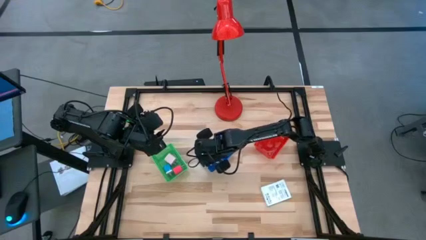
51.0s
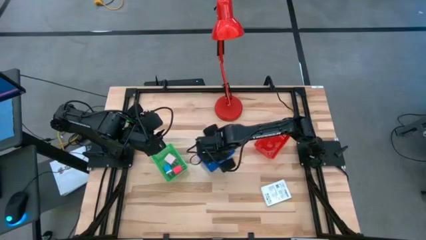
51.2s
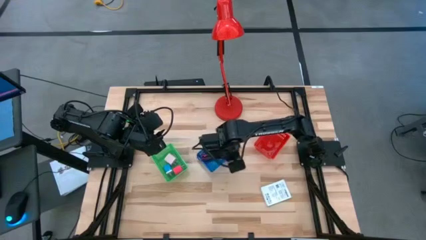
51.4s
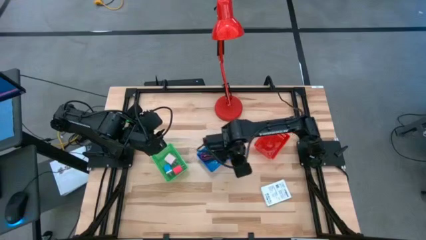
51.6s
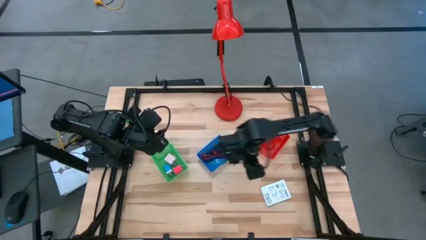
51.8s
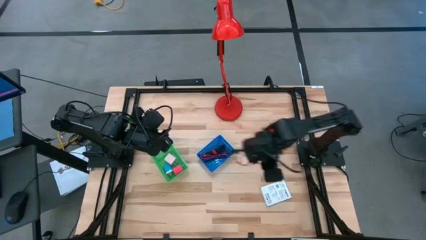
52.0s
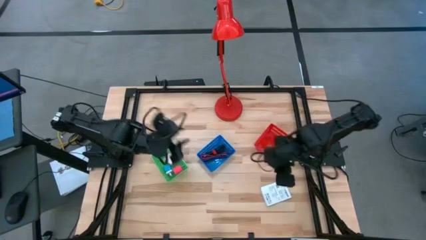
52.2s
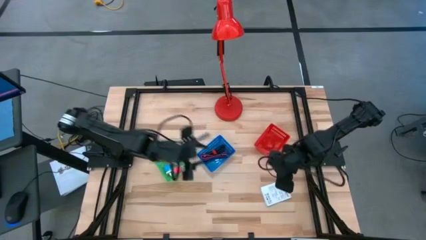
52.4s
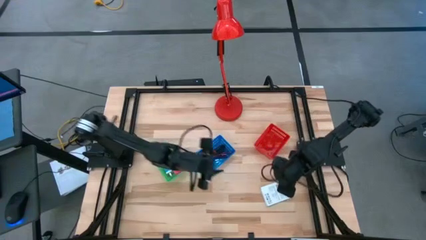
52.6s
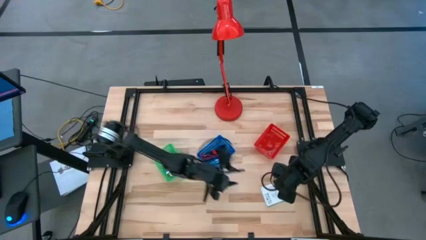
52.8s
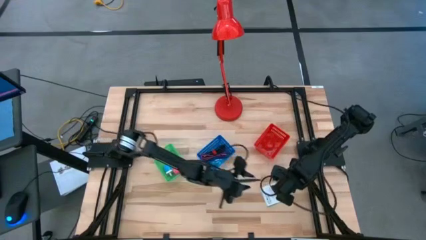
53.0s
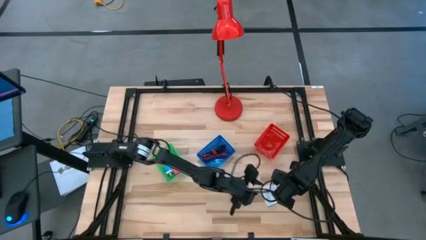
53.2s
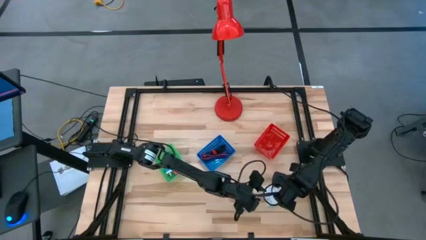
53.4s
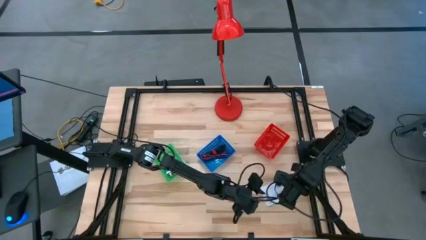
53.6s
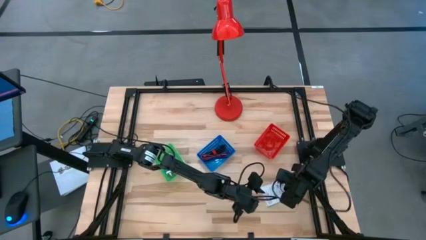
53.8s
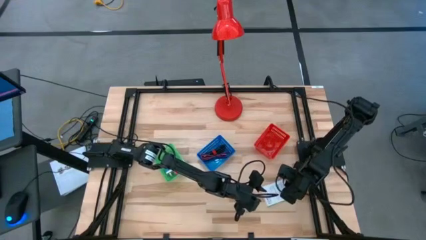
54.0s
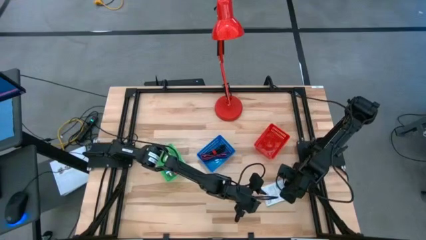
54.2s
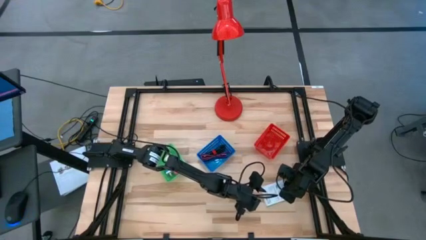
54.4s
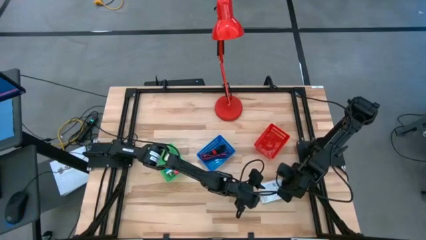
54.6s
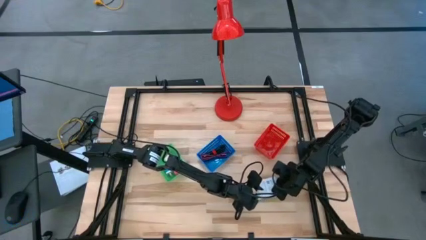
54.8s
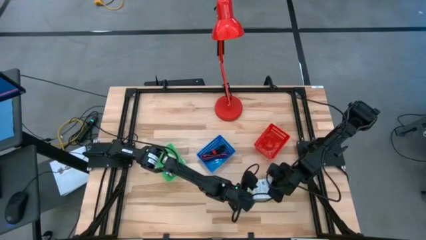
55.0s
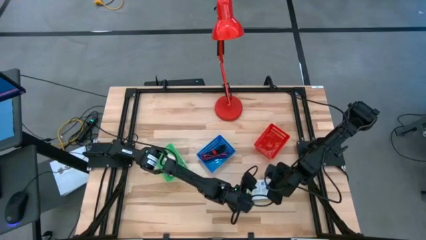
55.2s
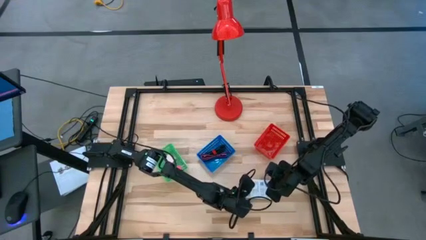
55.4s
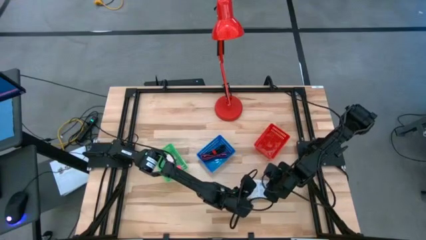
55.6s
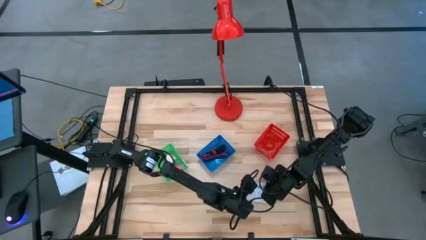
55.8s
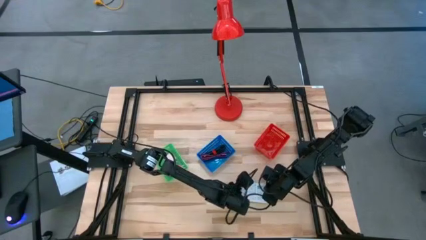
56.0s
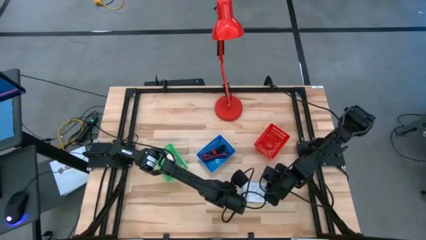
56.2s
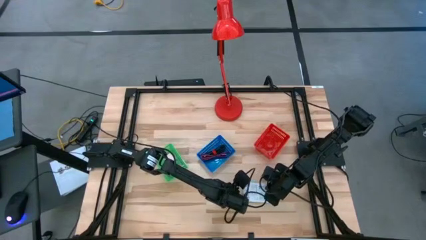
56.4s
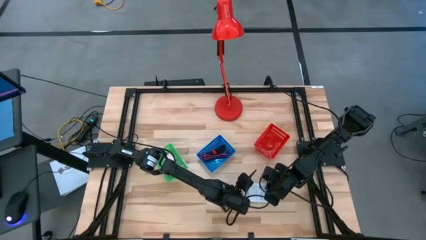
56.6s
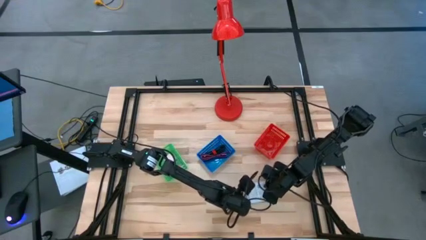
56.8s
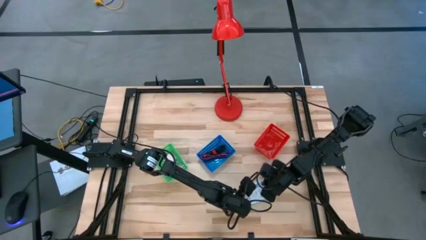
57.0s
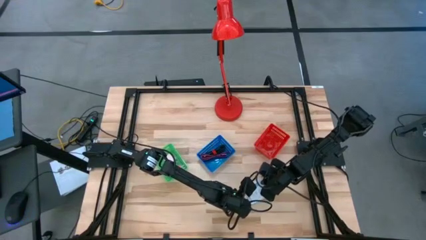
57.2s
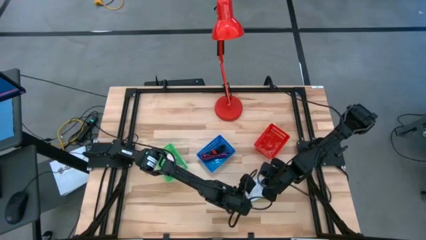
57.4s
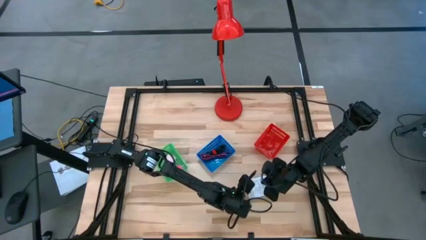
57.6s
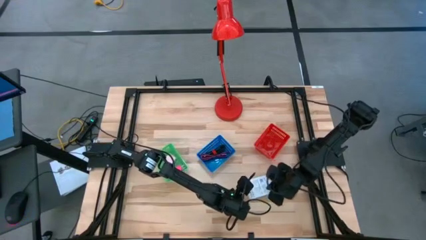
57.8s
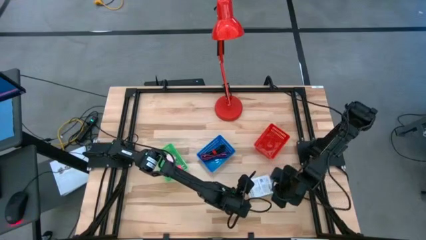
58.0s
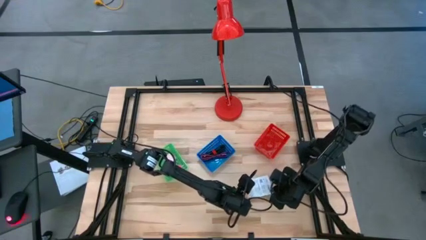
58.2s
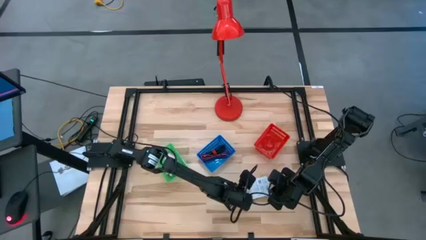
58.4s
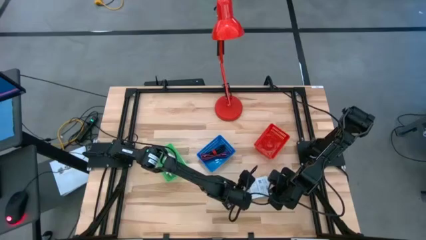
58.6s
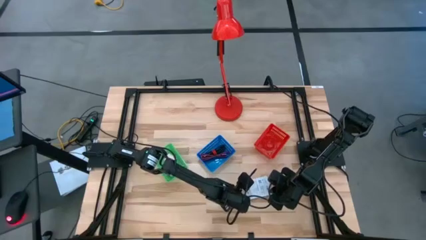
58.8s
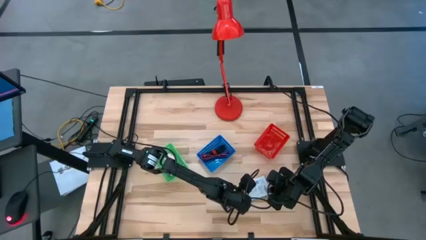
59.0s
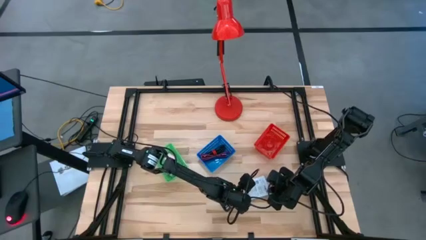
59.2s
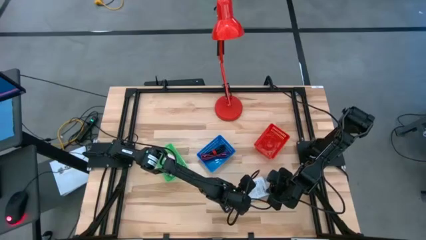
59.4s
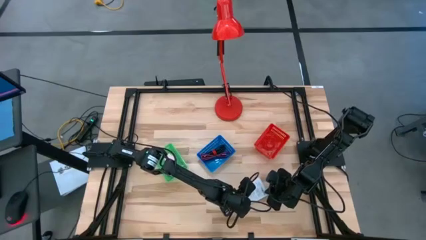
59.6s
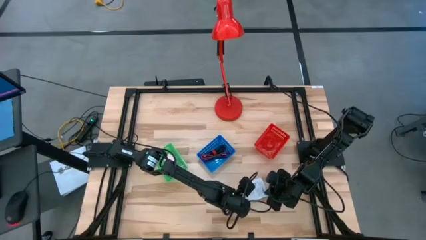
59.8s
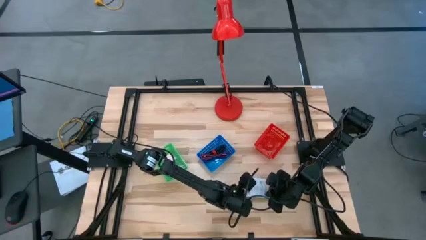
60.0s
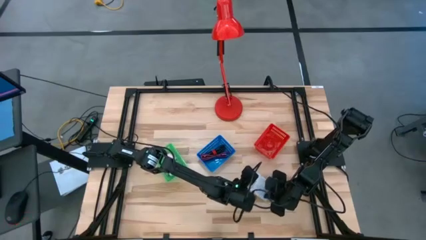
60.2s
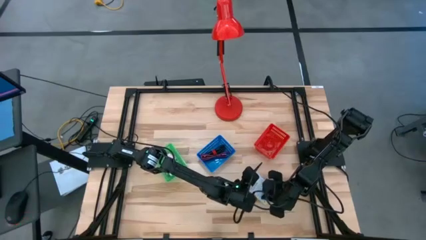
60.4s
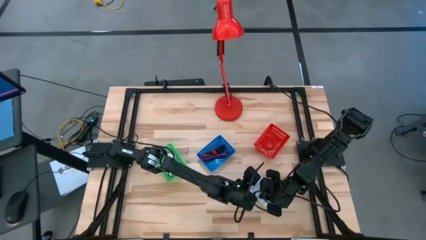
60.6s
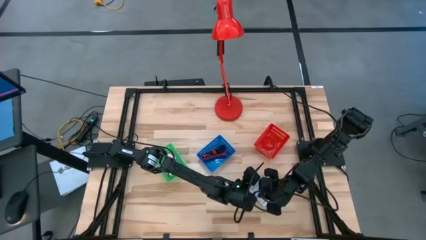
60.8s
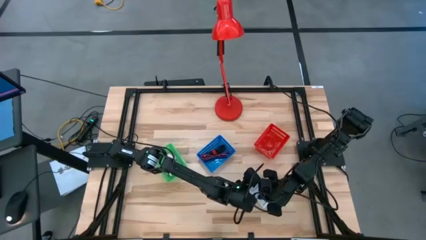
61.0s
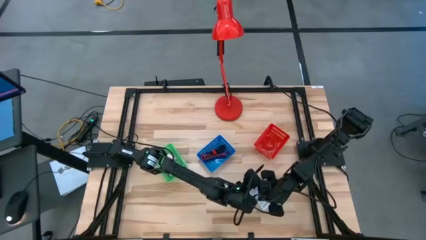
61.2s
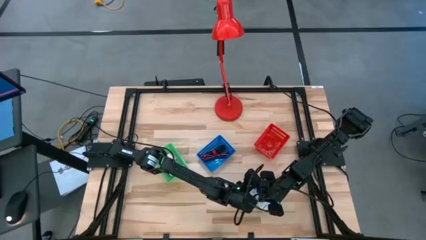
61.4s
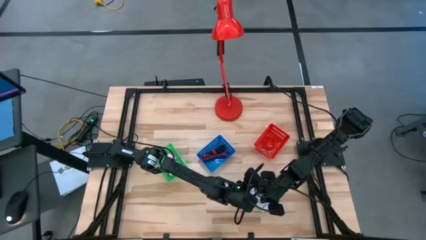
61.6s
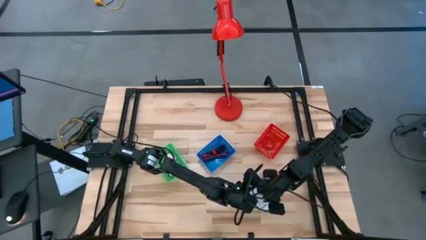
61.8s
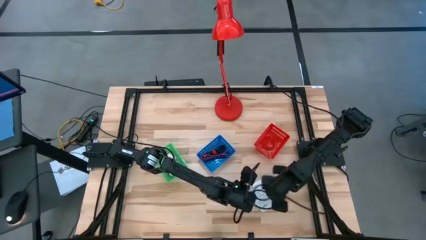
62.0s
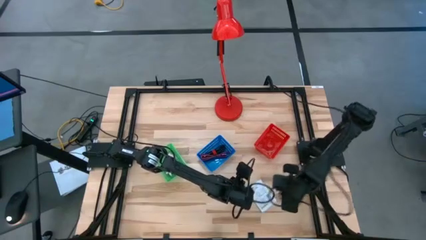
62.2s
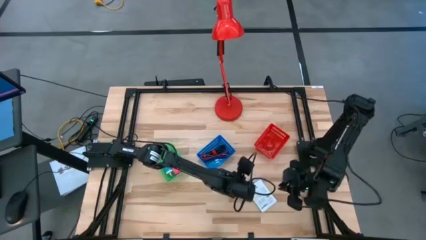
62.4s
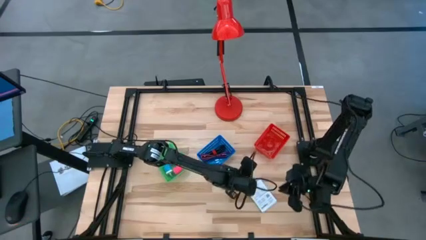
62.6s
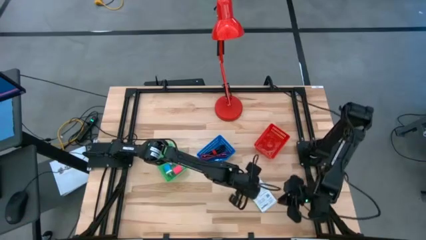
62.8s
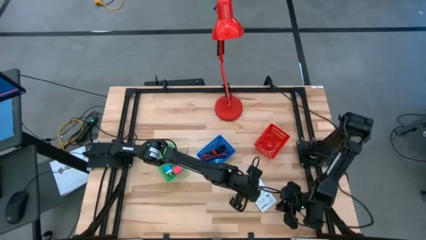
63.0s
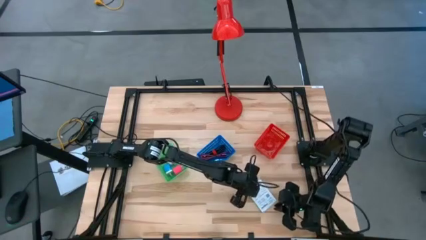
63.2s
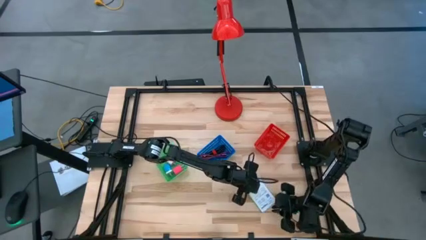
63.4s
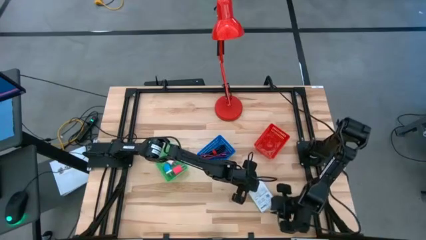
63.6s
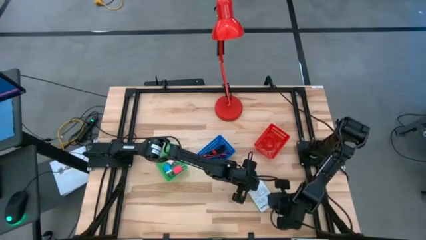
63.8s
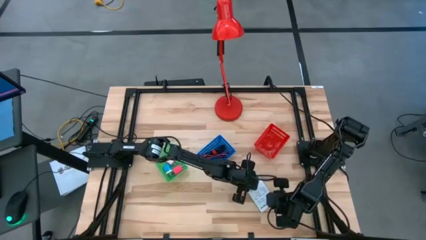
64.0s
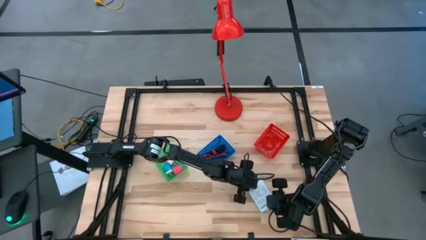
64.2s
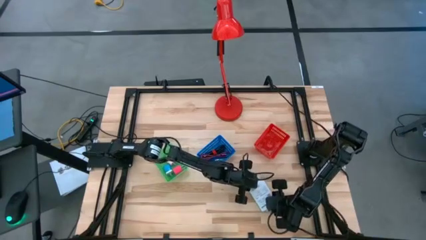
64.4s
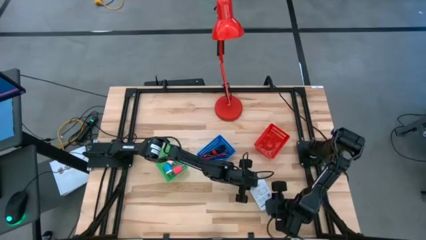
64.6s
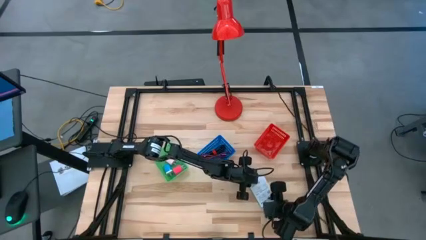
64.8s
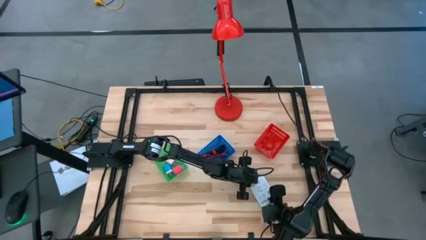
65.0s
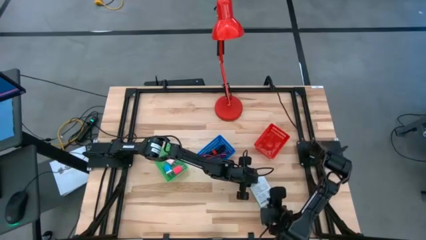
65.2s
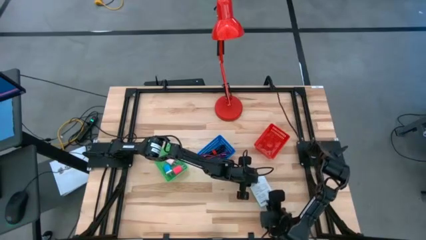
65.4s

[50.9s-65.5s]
Task: Pick and place items into bin
Put the card reader box into the red basket
